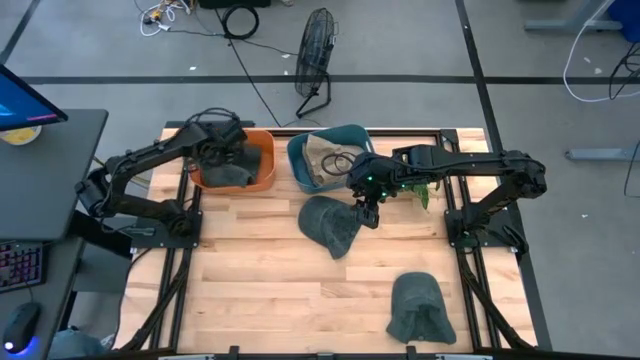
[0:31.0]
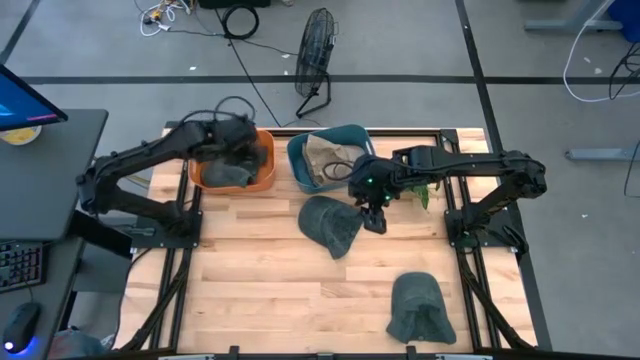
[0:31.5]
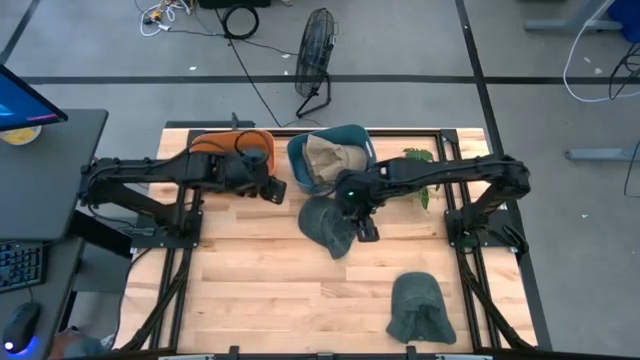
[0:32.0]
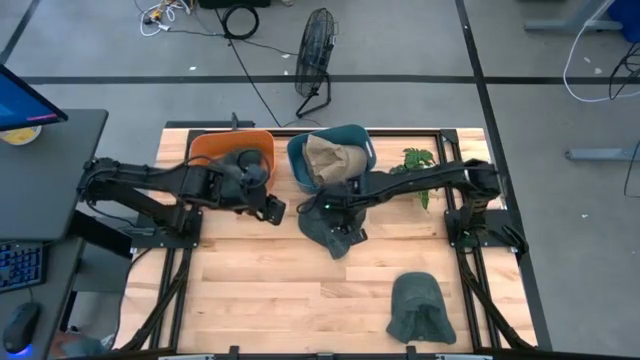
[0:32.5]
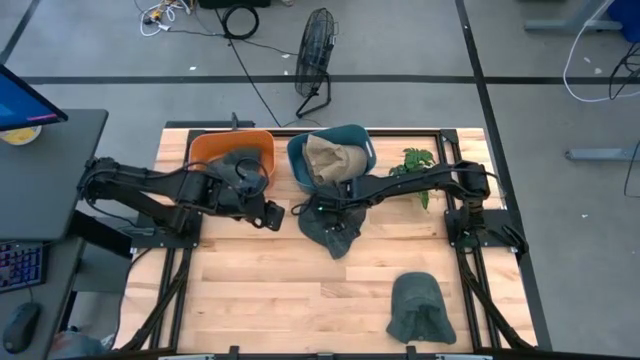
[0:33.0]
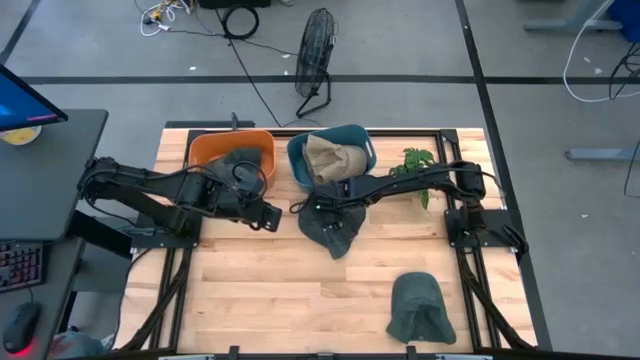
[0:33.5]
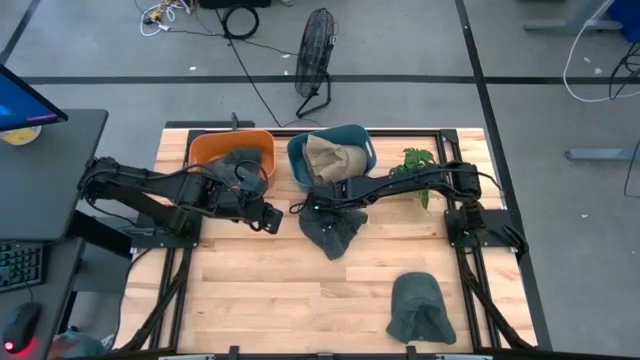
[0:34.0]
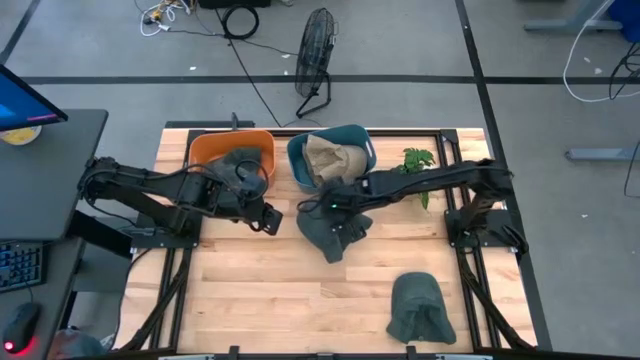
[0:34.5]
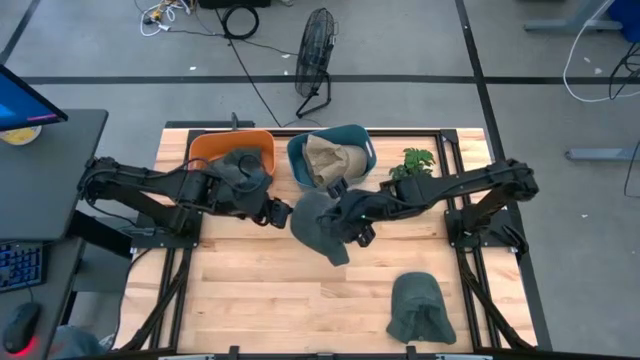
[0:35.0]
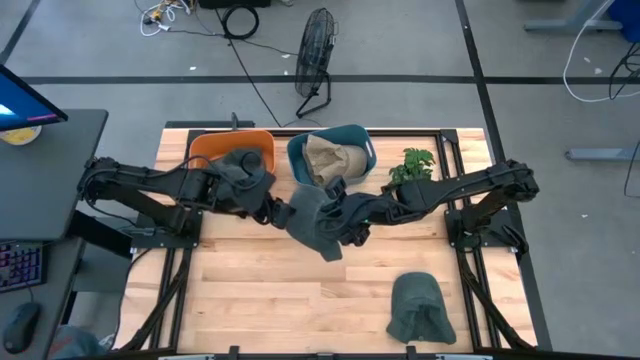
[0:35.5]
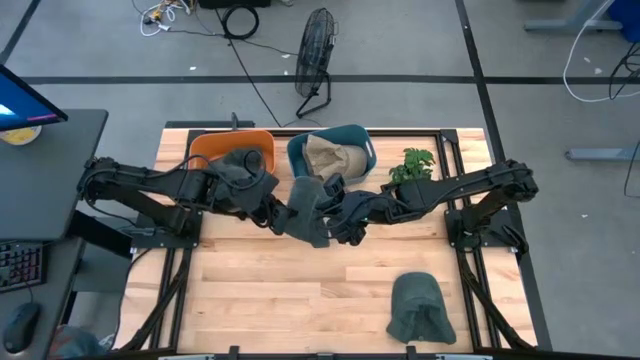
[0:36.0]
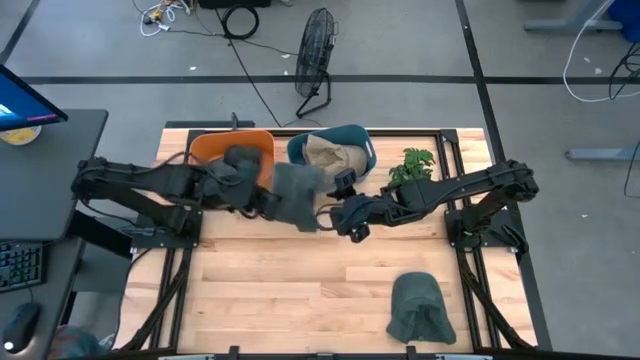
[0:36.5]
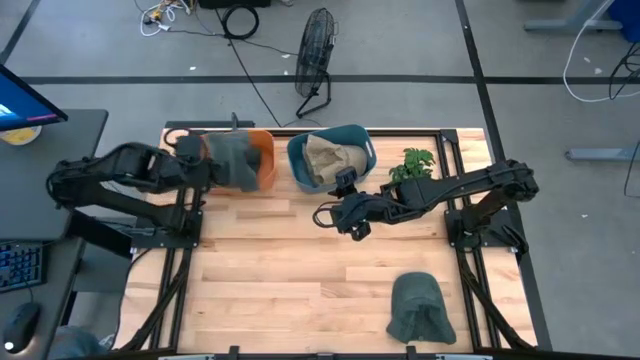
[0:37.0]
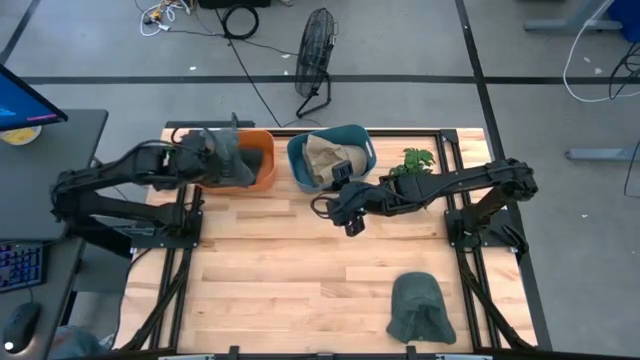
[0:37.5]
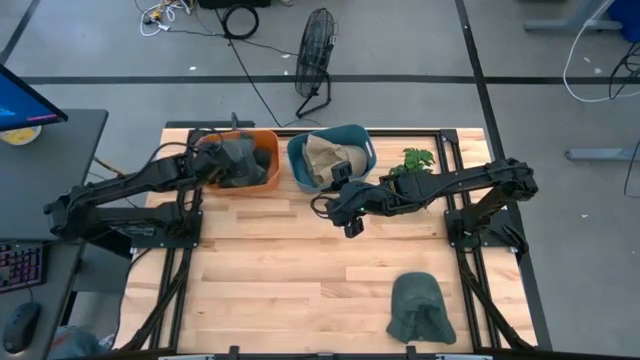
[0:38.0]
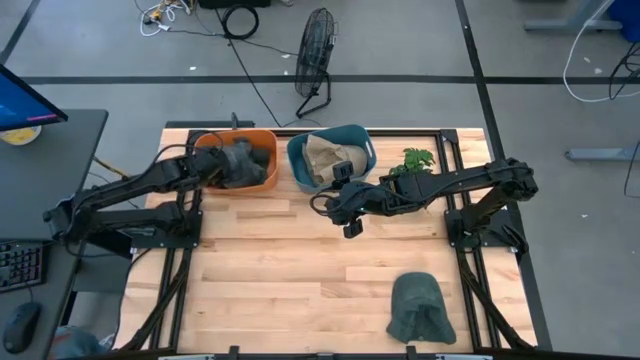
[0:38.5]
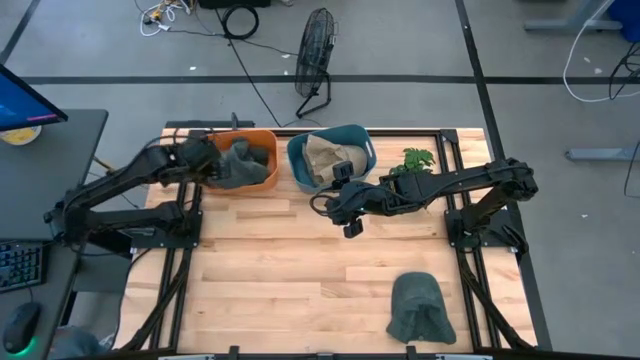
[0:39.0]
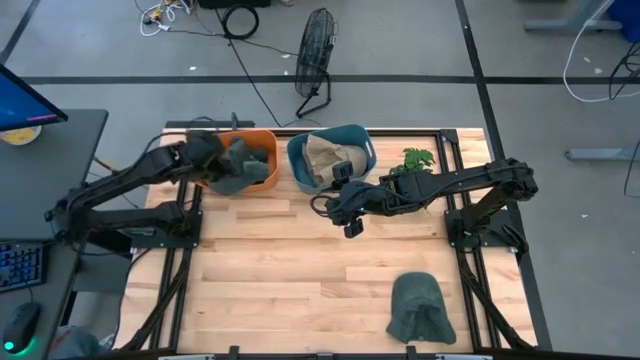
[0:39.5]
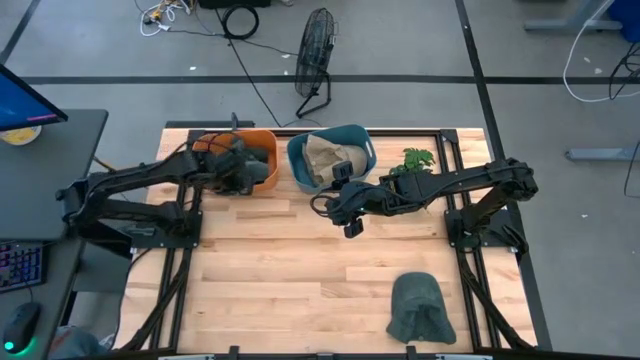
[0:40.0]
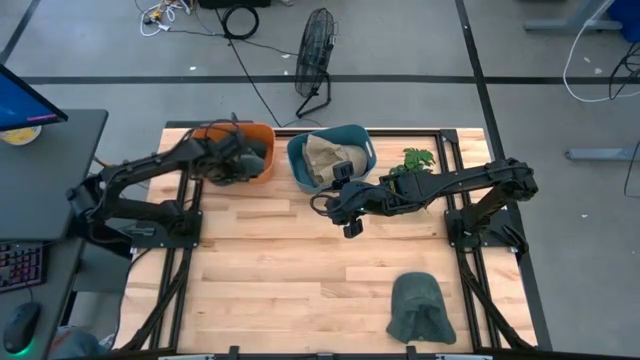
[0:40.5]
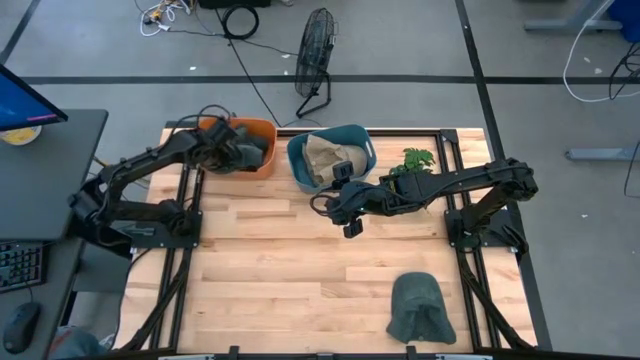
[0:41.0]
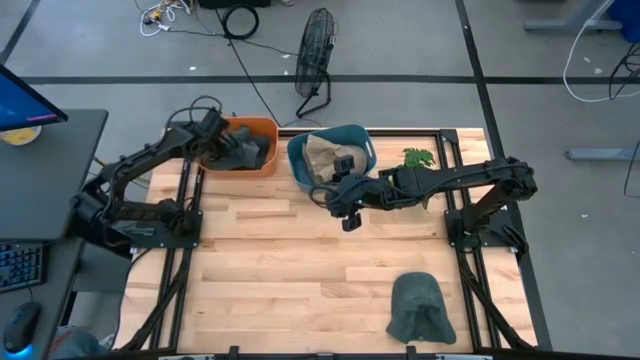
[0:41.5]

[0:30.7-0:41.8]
Task: Pick & Place hat
Put the top gray cap into the orange bin

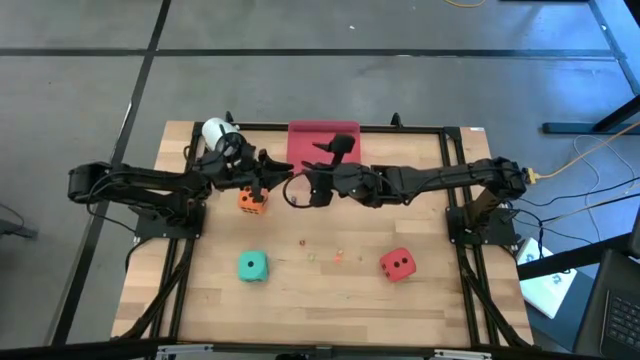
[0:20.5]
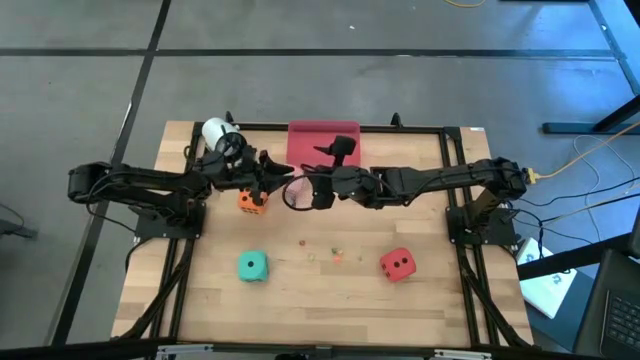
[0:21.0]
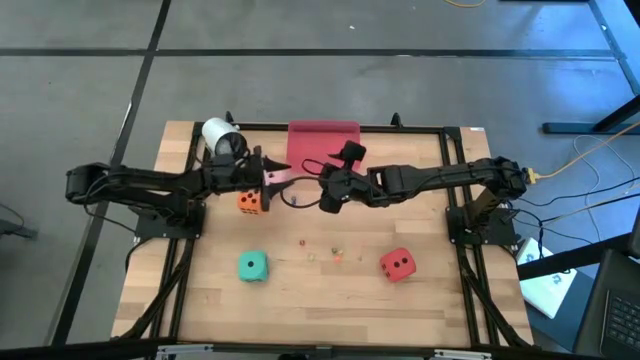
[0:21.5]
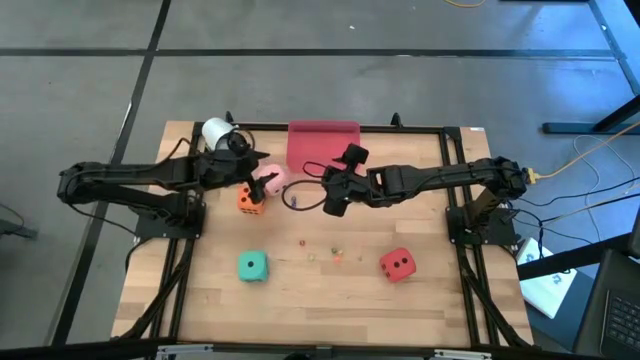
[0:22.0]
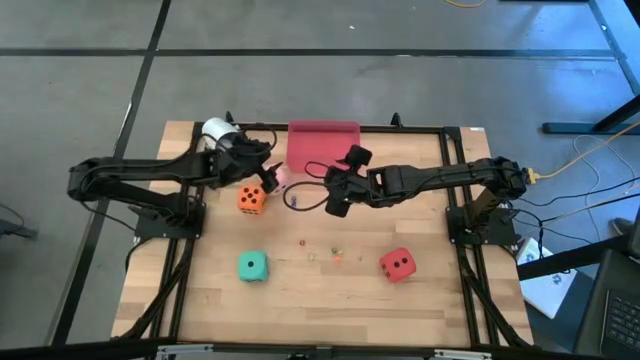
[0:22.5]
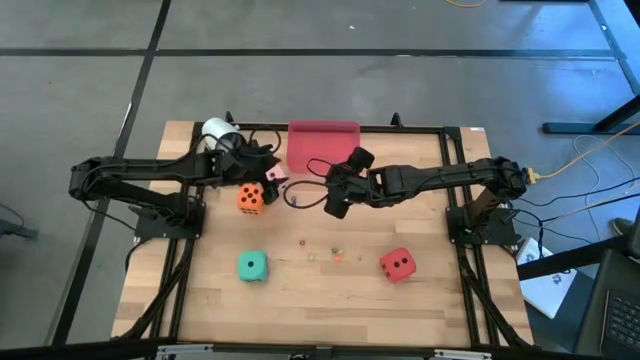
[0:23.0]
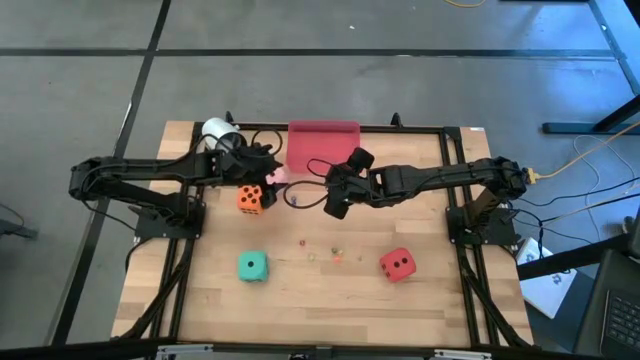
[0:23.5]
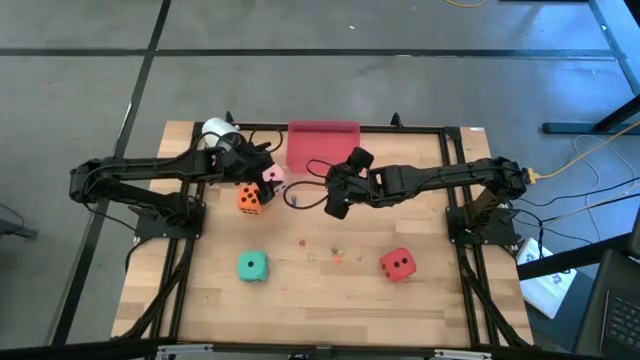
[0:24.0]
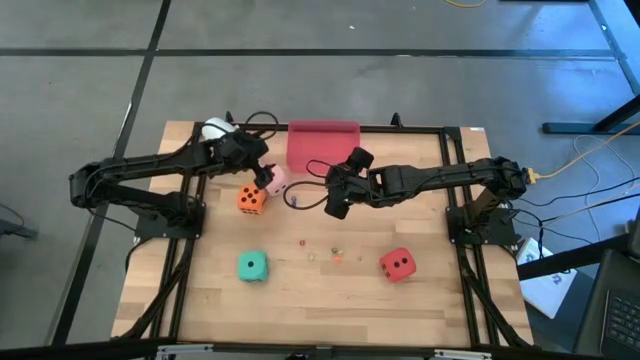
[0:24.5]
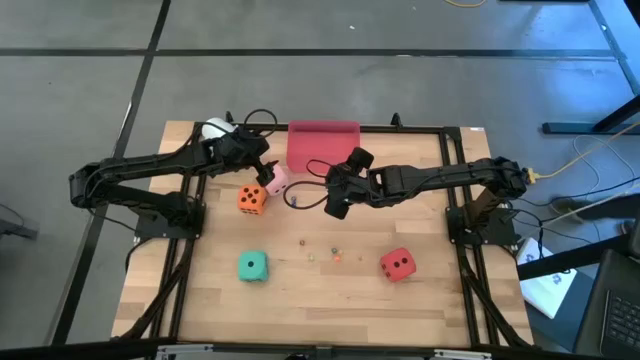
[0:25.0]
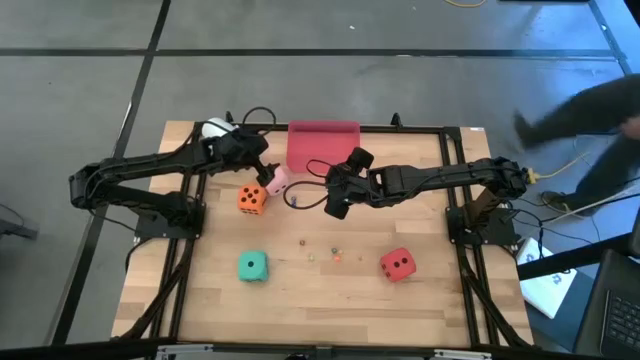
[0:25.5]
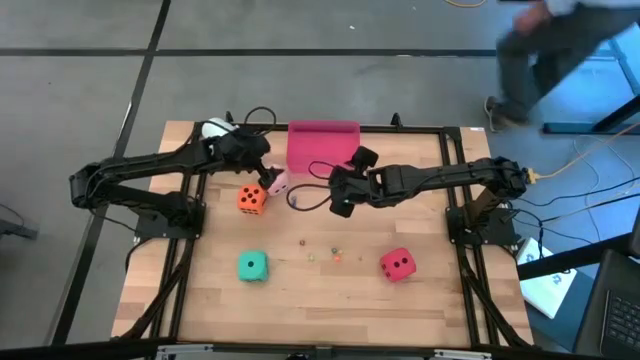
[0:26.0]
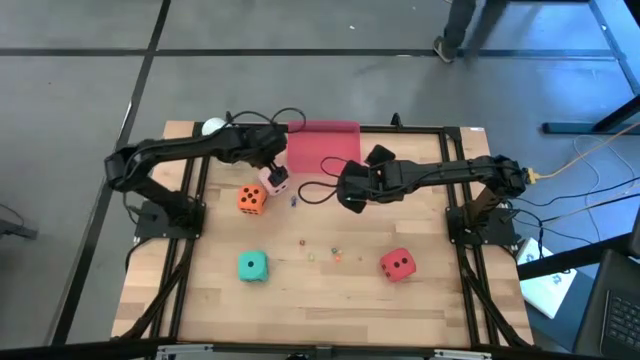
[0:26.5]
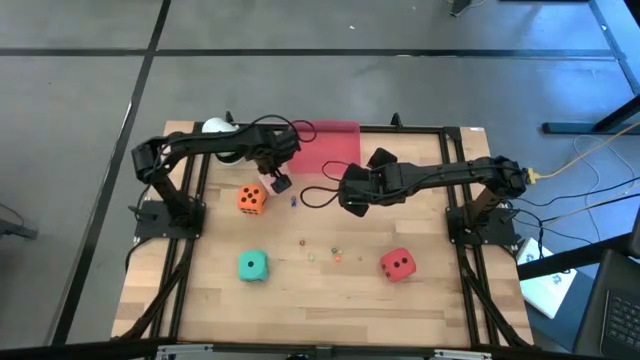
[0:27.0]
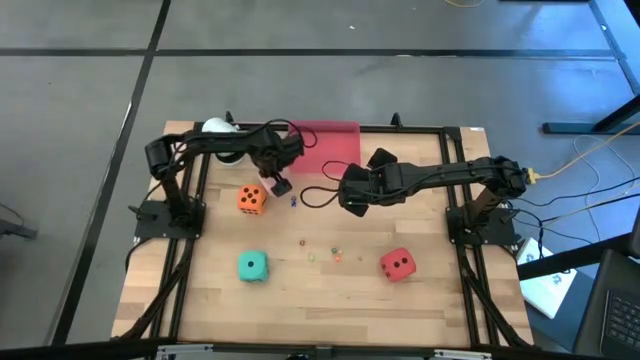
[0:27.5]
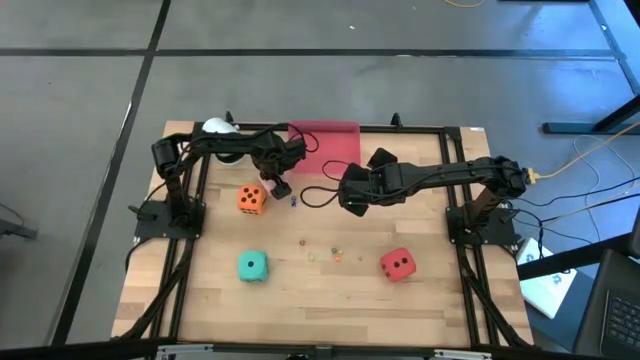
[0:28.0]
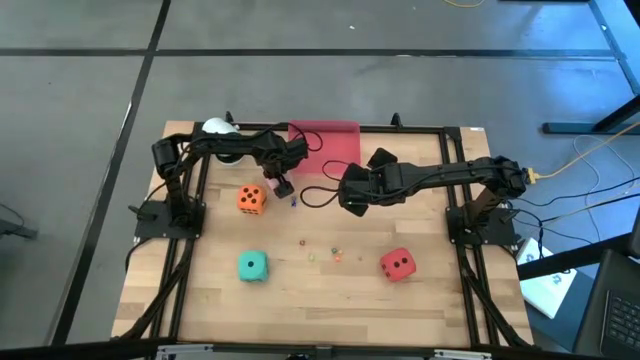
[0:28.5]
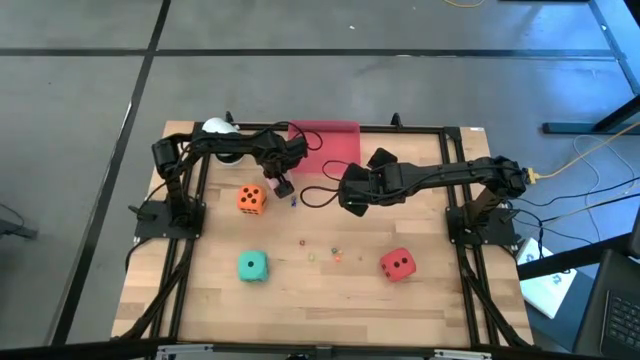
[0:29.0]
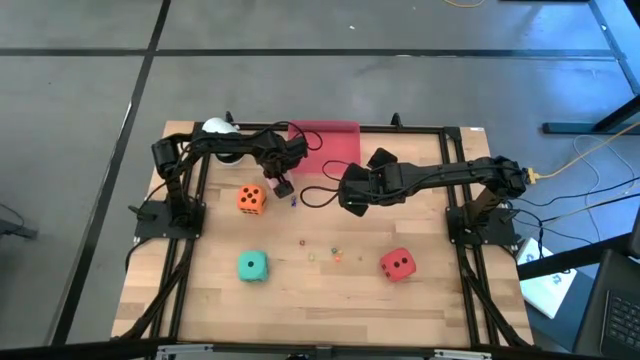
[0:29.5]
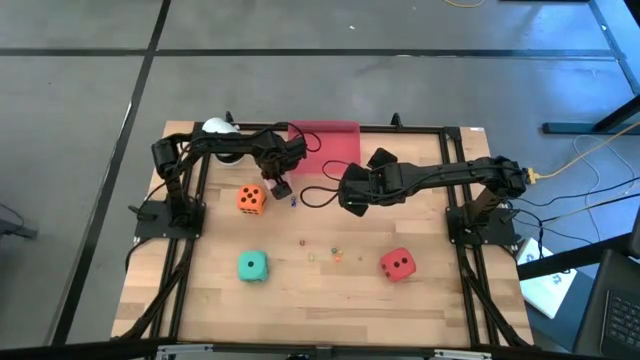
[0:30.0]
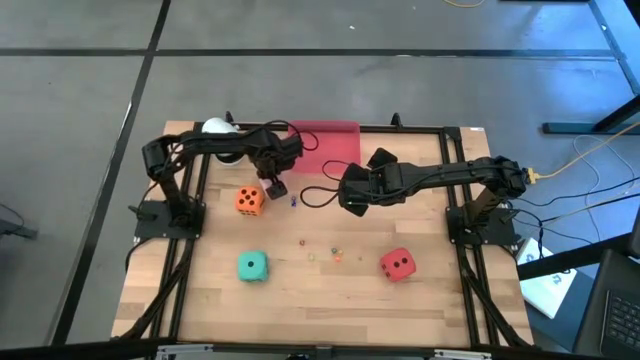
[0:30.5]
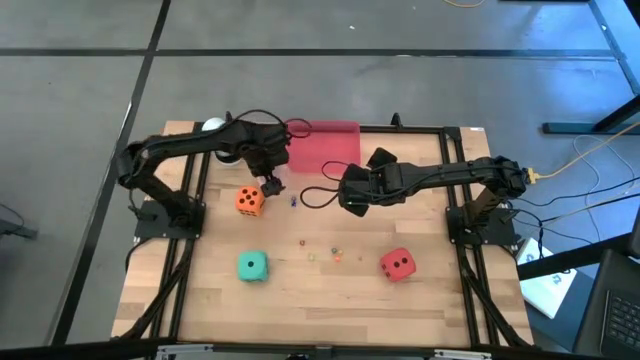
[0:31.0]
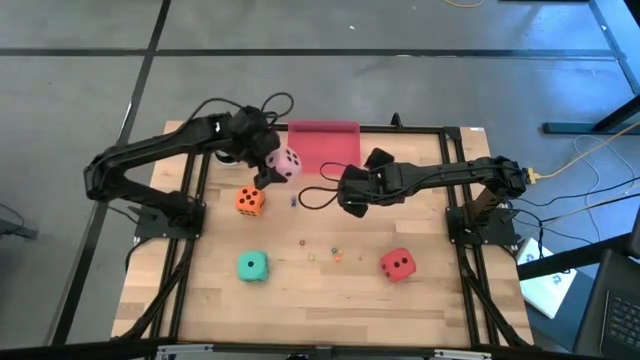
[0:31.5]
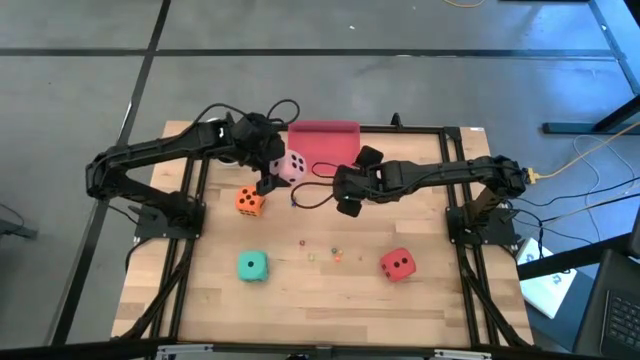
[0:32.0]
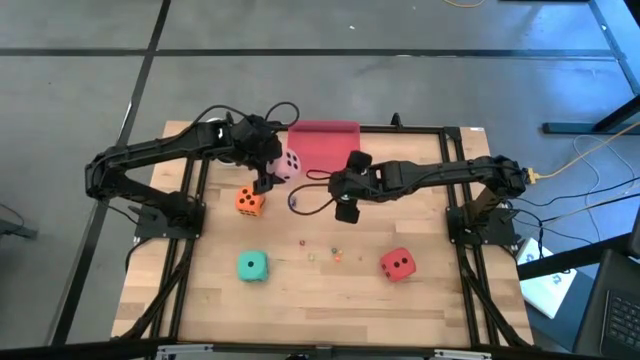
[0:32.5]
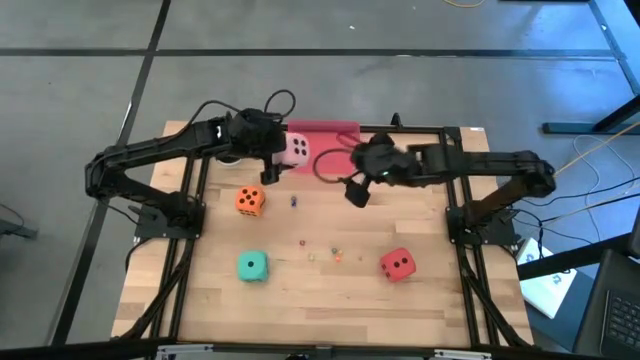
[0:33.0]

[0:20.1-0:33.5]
Task: Pick & Place Dice
Put the big pink dice into the pink bin
